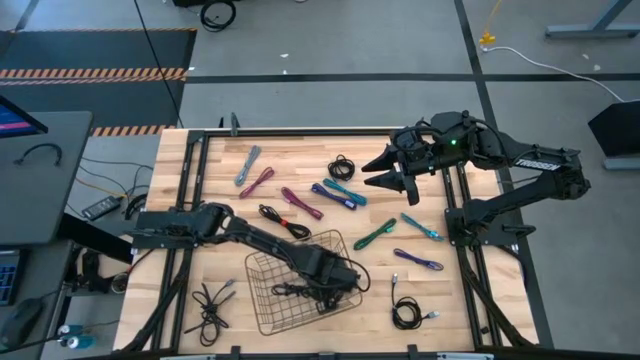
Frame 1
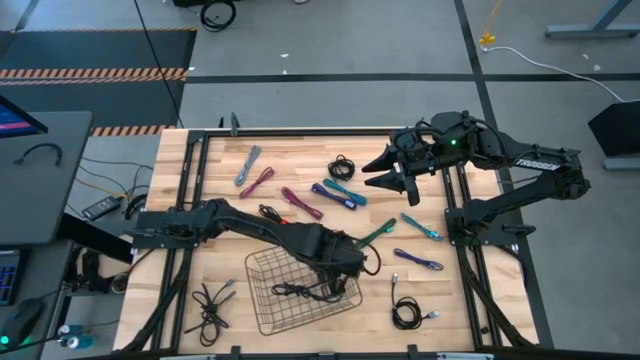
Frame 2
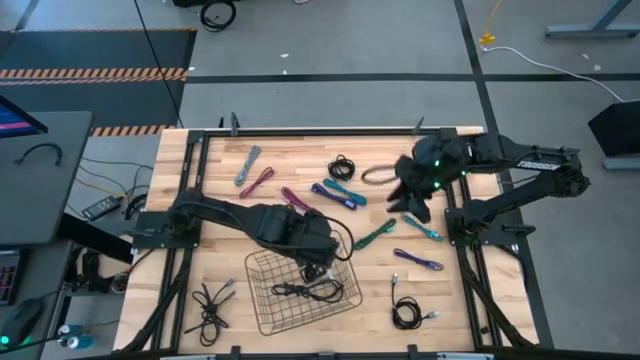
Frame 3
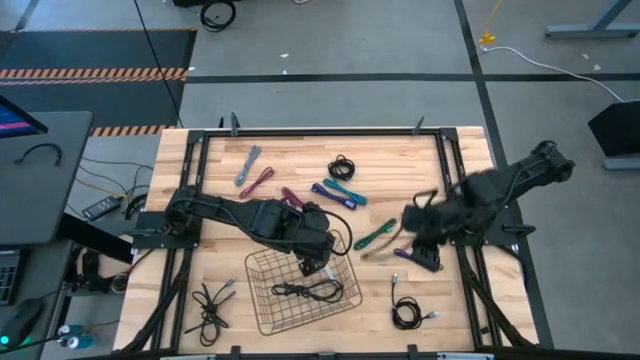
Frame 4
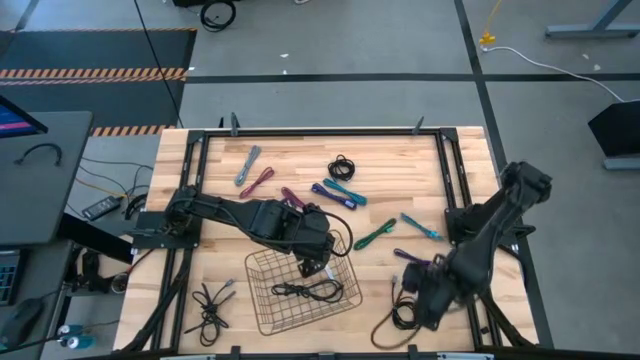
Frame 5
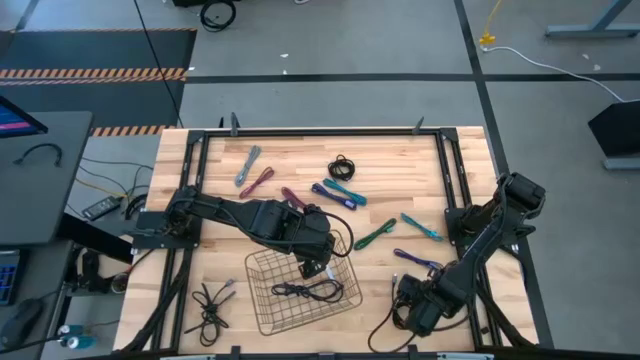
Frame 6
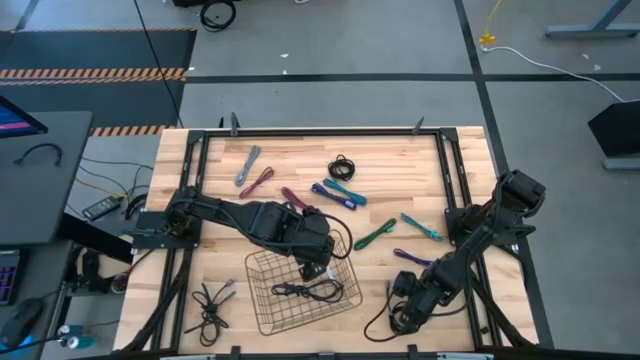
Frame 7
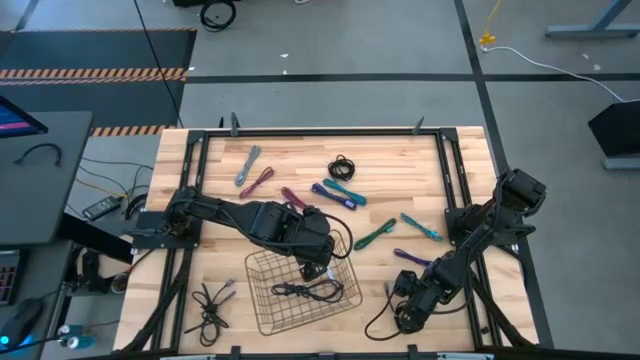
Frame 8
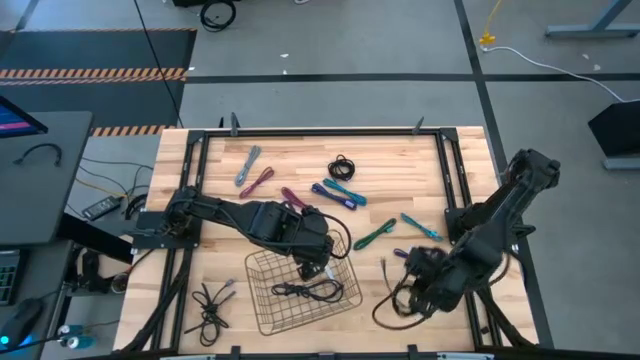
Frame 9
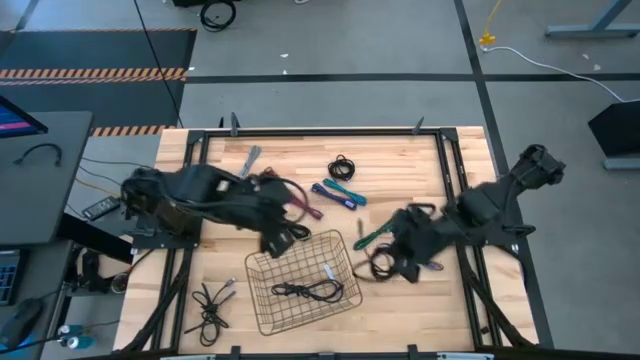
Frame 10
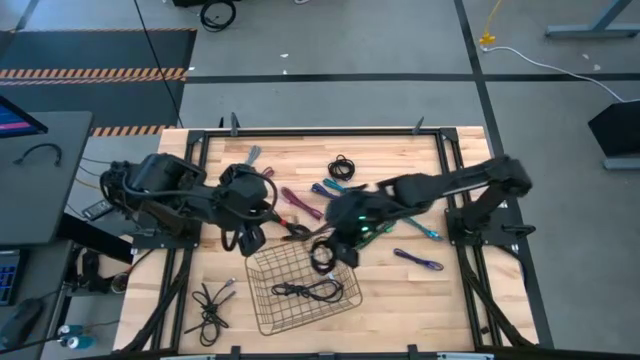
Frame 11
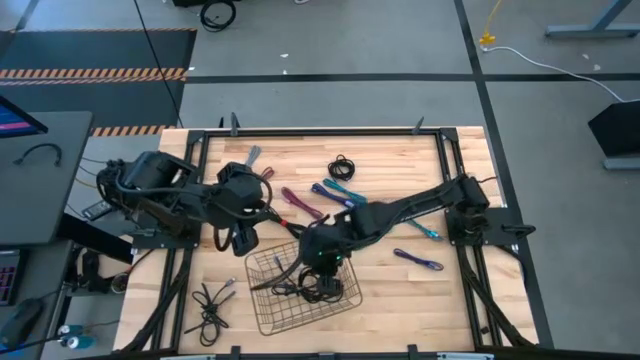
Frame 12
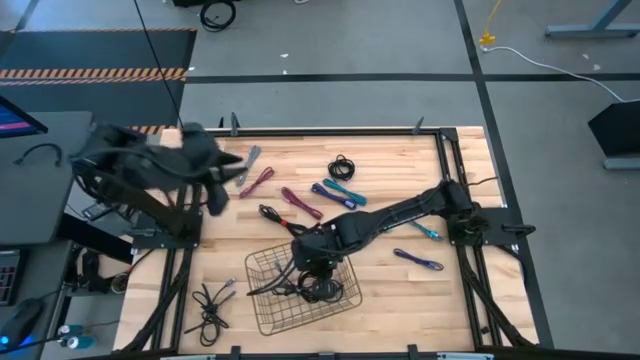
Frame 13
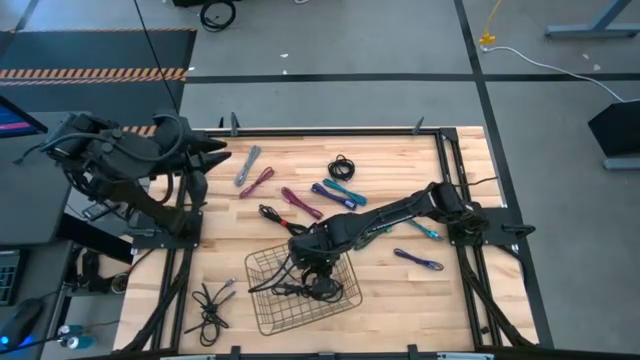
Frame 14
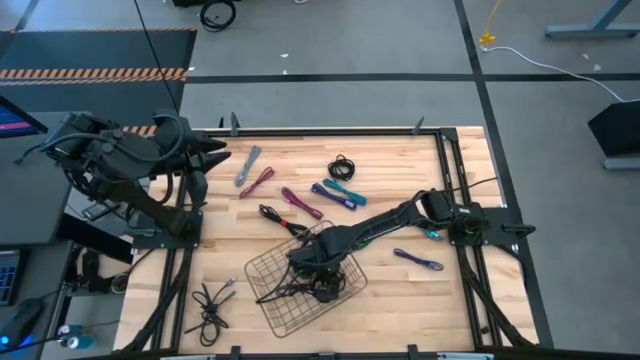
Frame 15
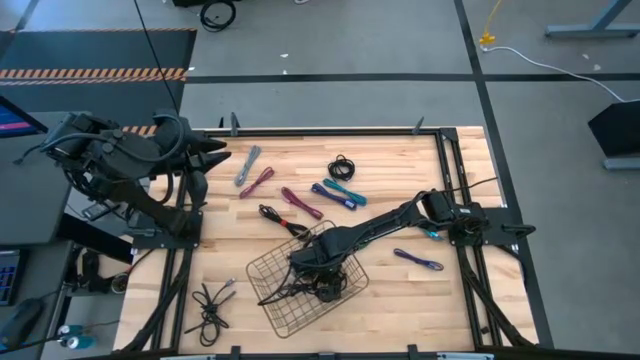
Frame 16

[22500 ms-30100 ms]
Task: Pick and place USB-C Cables
Put the black charger cable into the wire basket

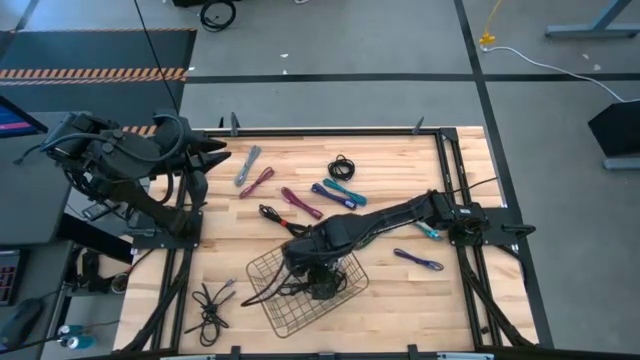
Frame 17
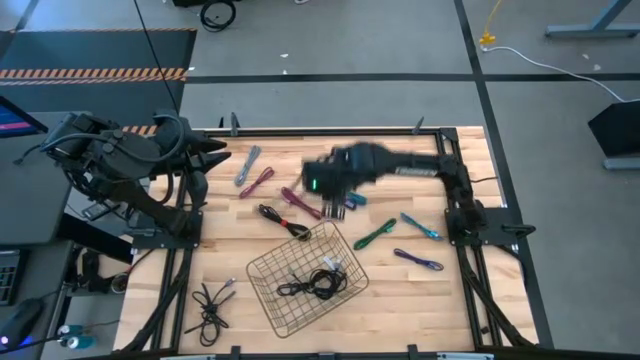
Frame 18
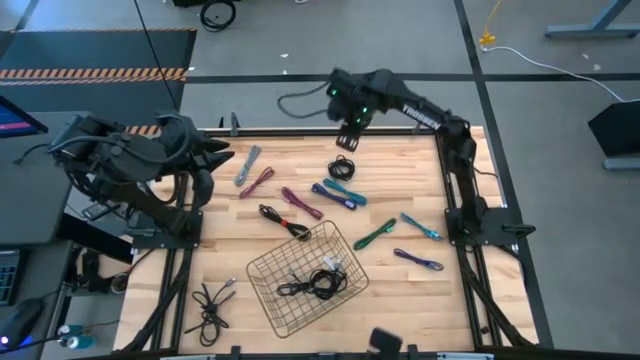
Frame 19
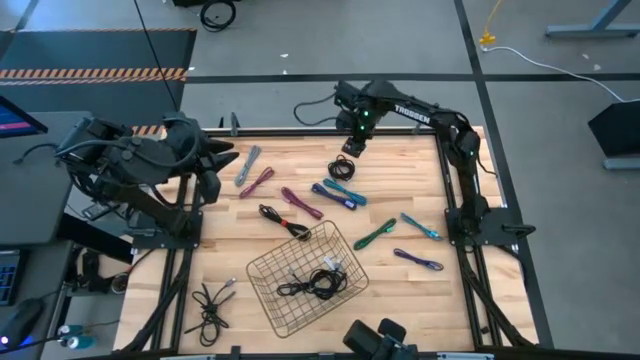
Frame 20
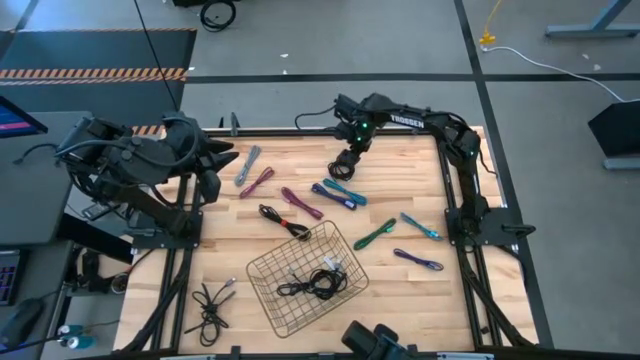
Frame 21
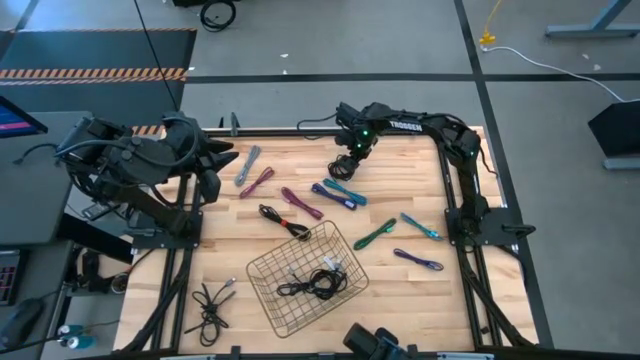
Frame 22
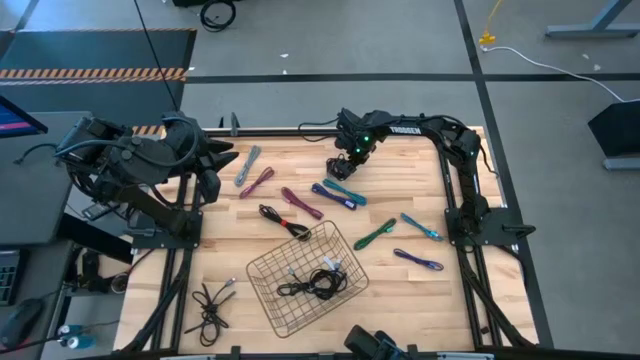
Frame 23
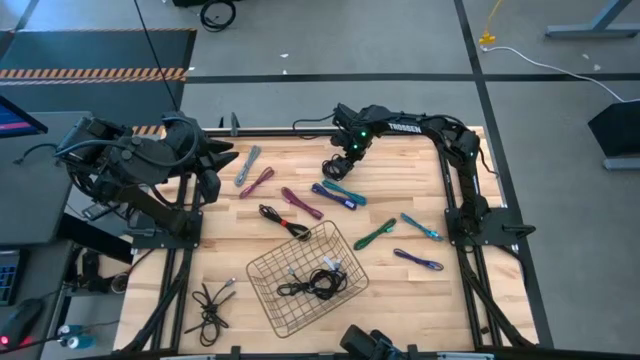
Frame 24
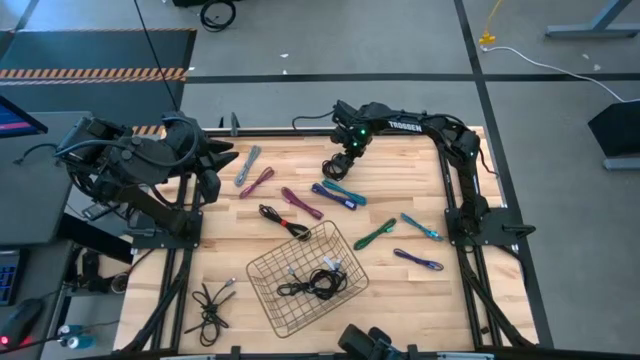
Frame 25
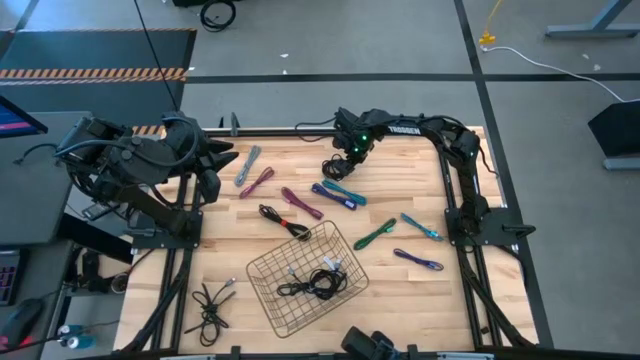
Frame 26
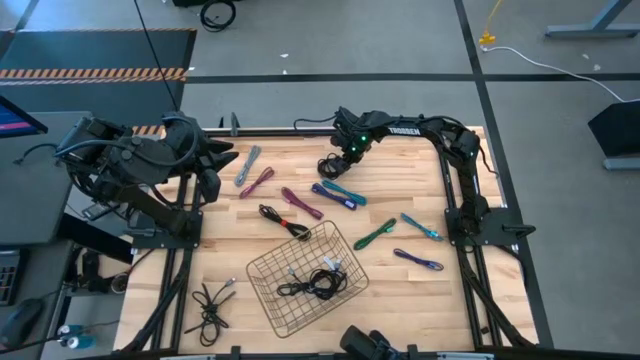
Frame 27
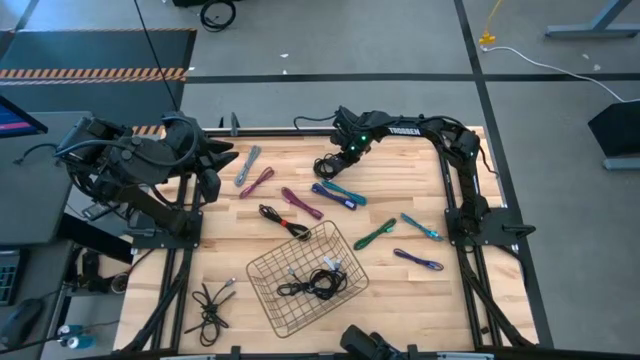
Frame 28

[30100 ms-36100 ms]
Put the black charger cable into the wire basket
